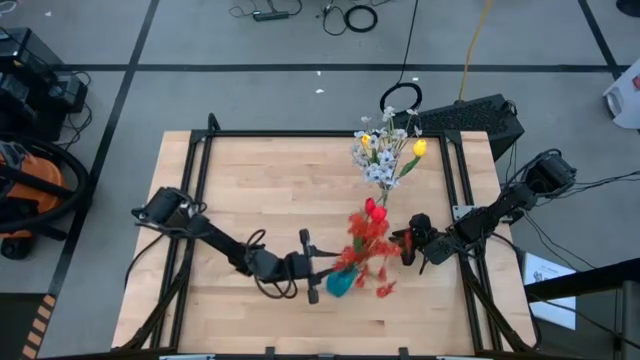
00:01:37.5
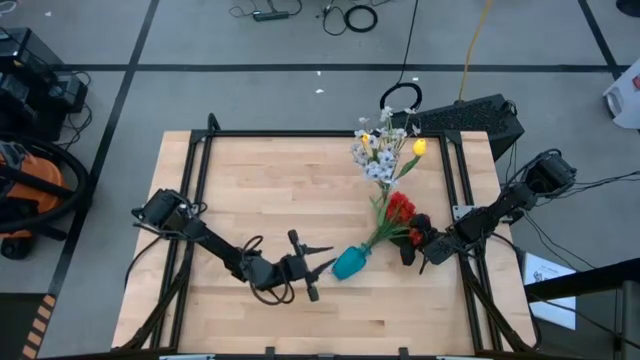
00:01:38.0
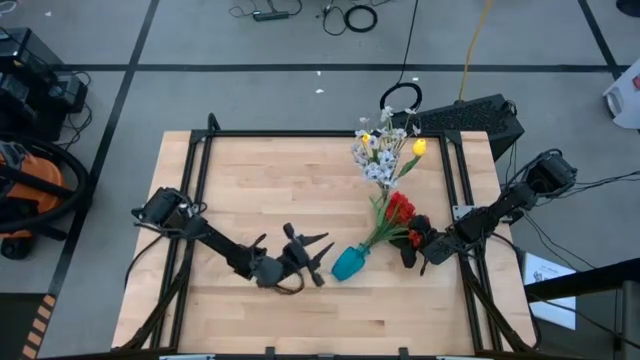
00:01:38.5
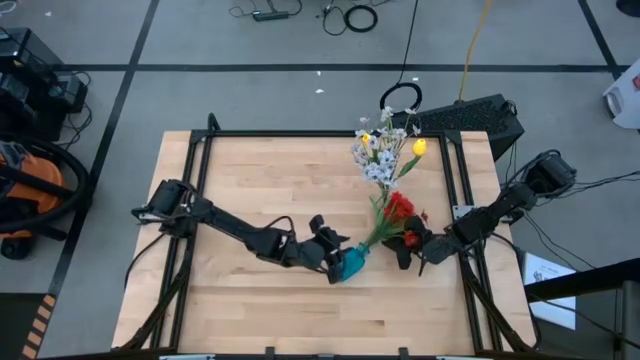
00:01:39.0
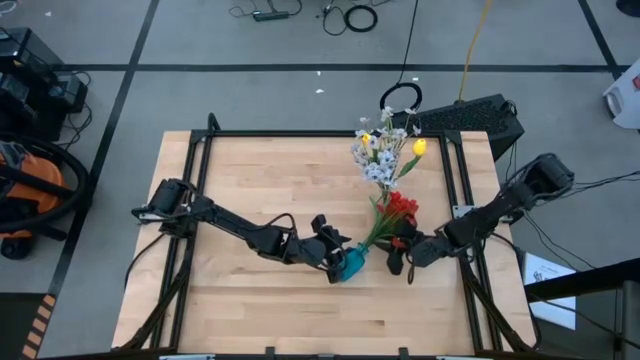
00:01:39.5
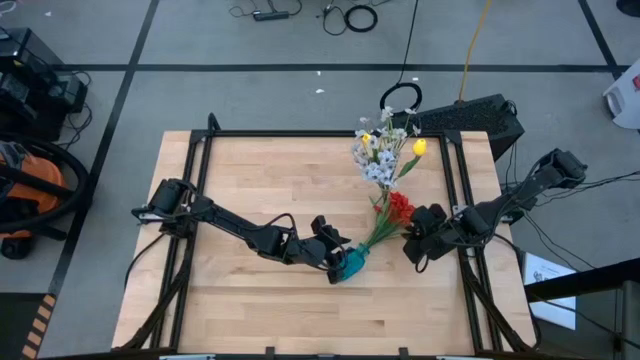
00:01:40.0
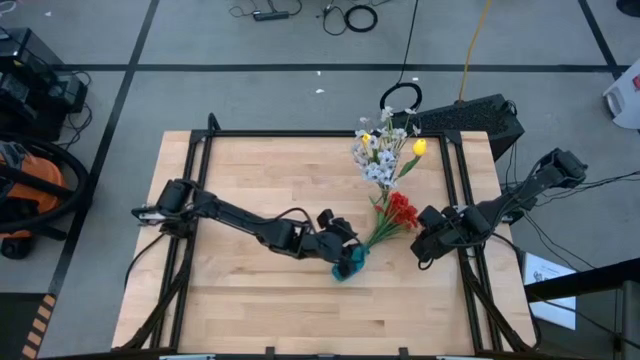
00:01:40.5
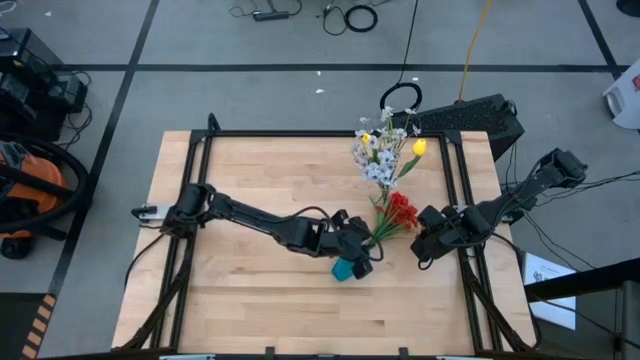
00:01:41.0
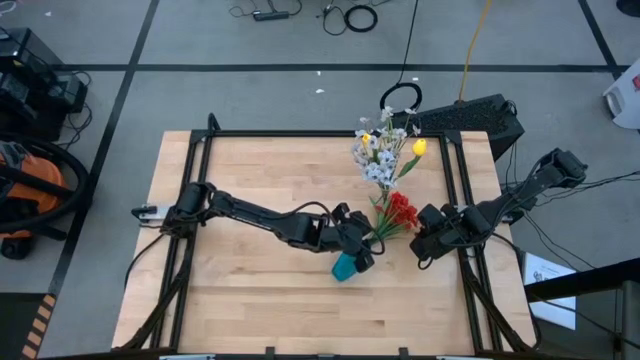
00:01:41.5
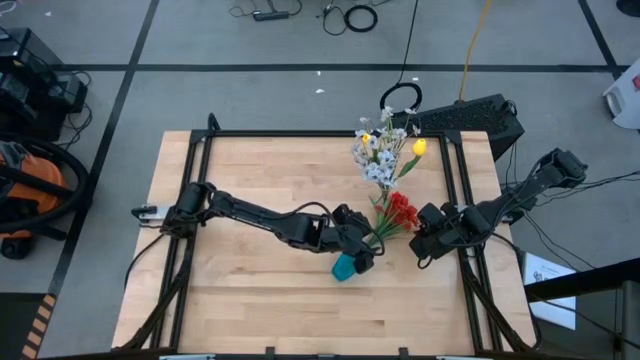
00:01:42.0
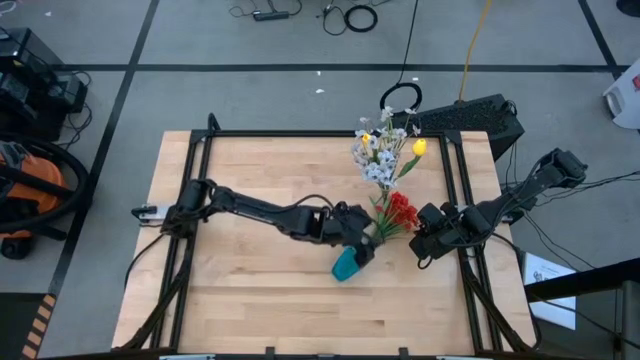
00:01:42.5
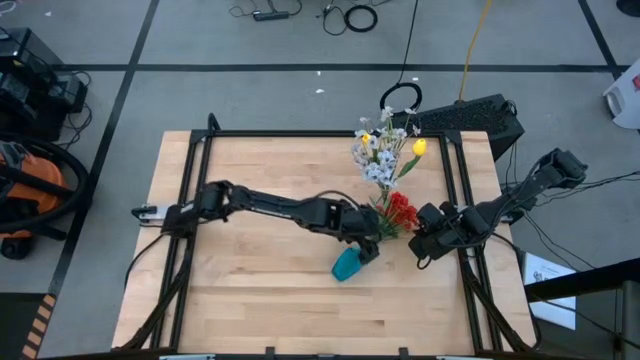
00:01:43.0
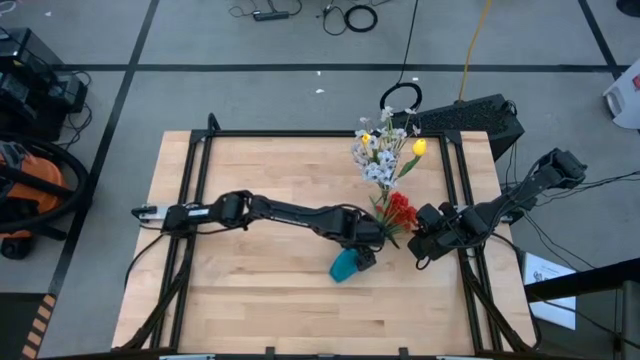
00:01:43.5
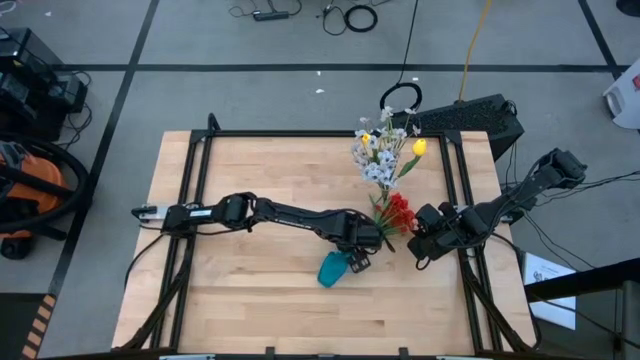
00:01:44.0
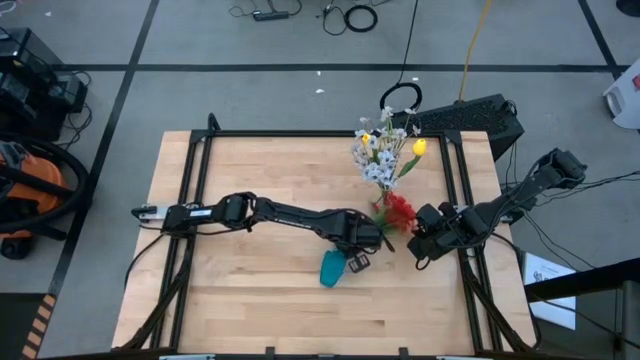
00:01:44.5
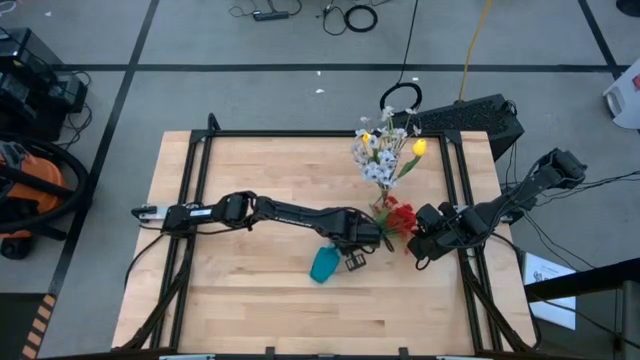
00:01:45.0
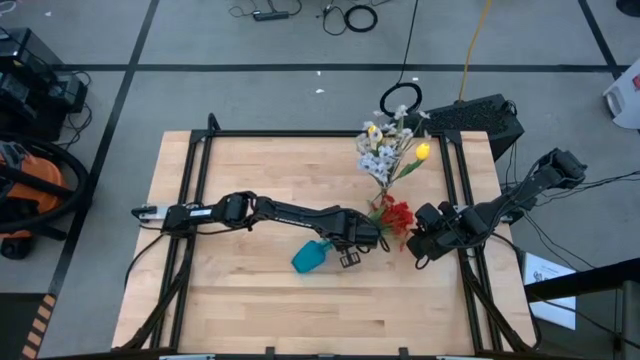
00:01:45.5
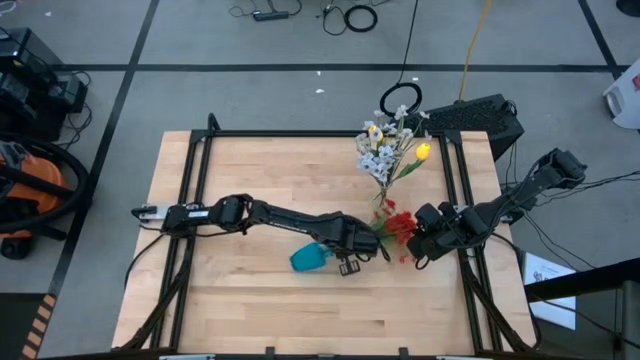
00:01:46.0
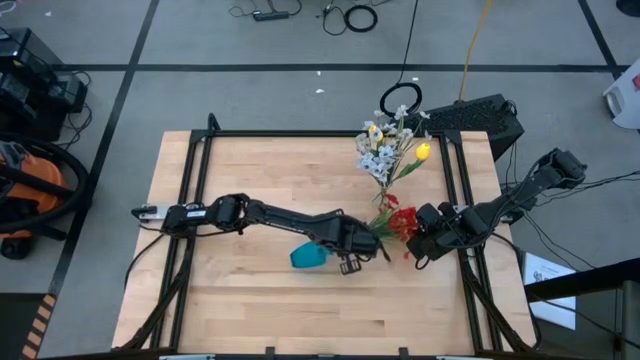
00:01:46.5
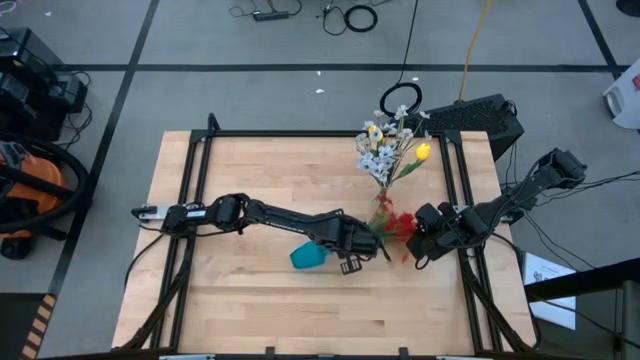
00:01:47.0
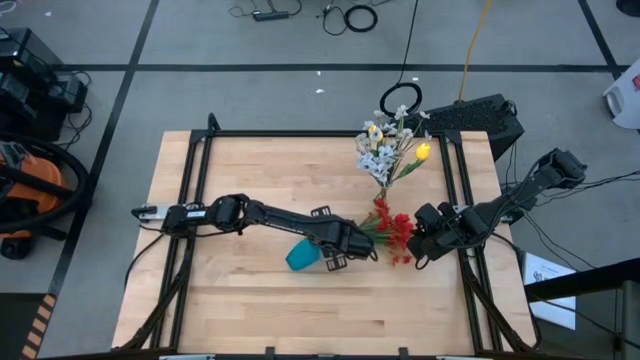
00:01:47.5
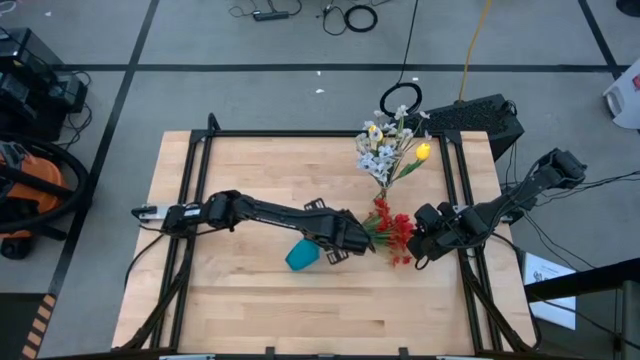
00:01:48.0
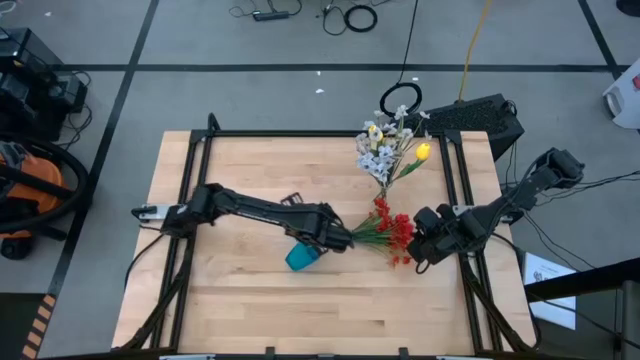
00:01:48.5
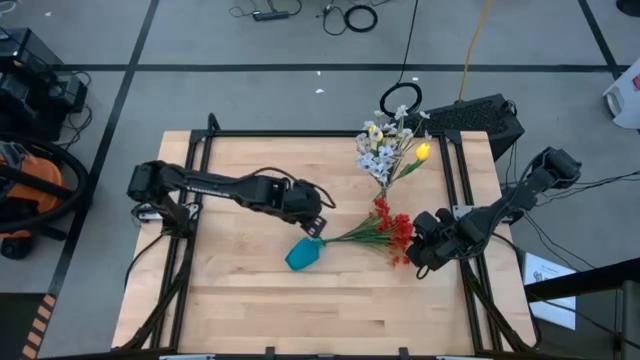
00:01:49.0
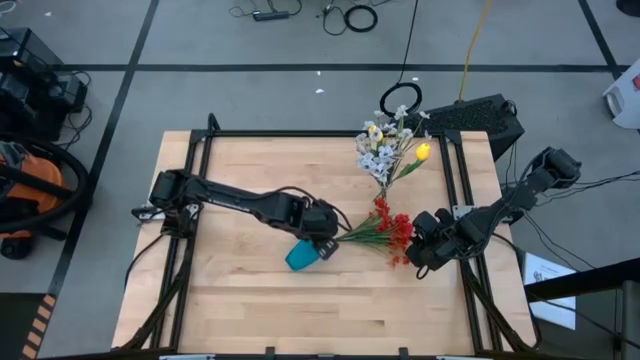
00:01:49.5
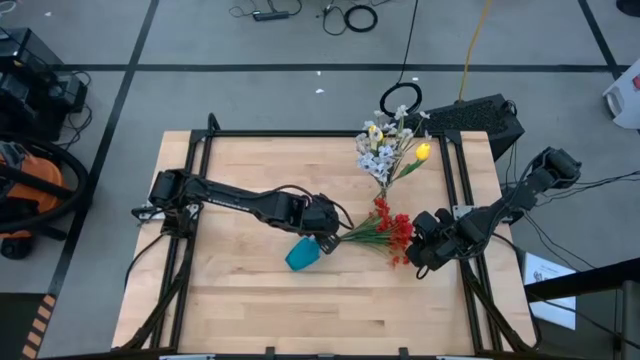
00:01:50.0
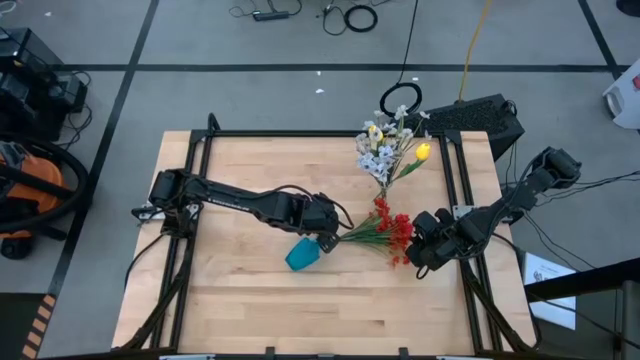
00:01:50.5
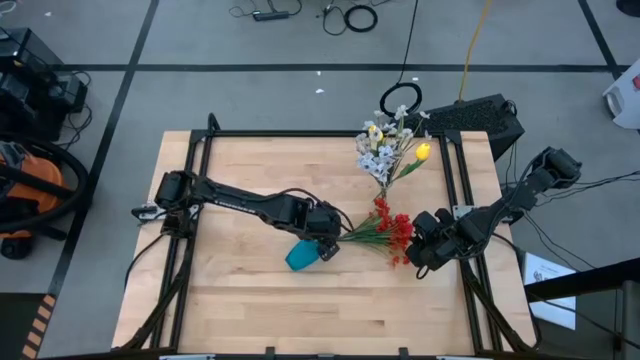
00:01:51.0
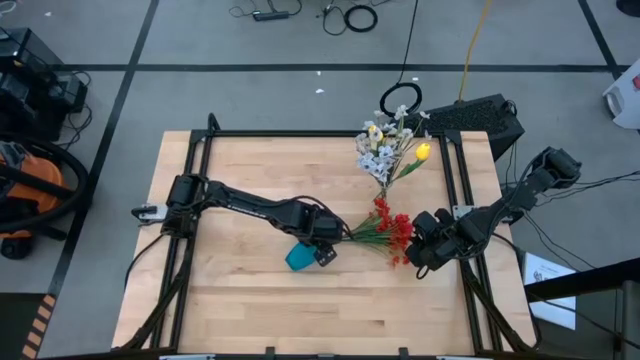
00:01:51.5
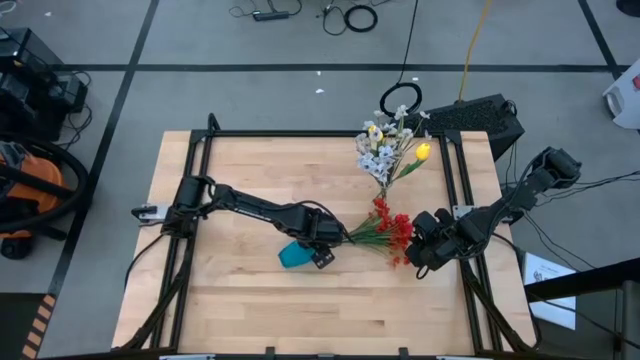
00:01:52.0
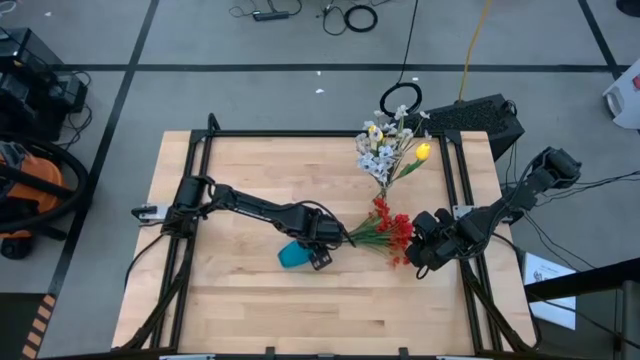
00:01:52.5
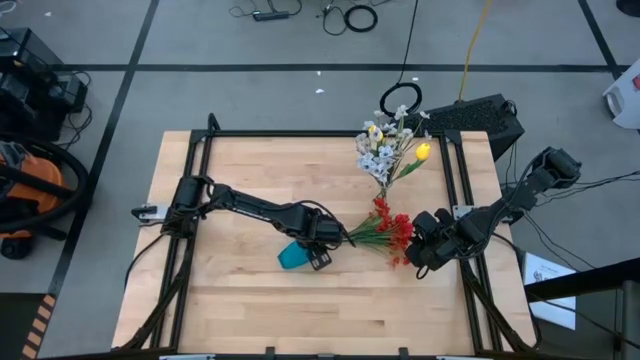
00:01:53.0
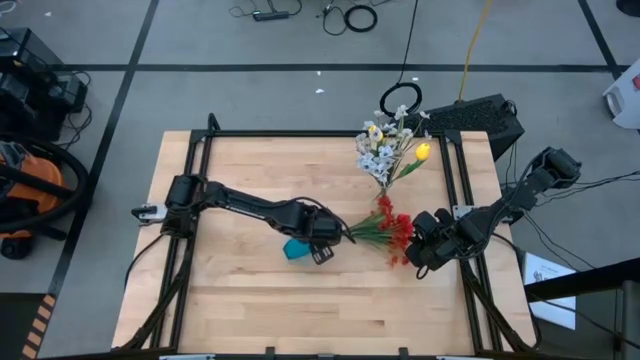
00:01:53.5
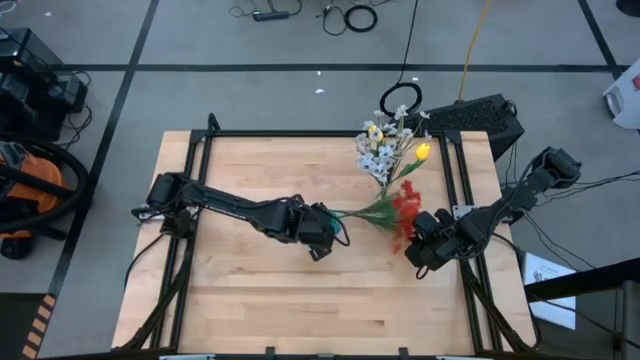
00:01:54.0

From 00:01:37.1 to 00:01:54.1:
Task: Sort flowers into vase by color
Adjust the blue vase on the table

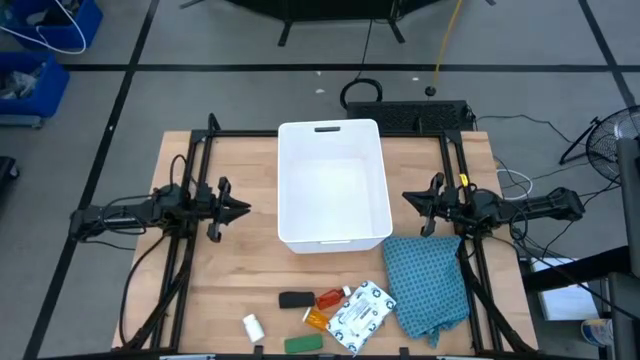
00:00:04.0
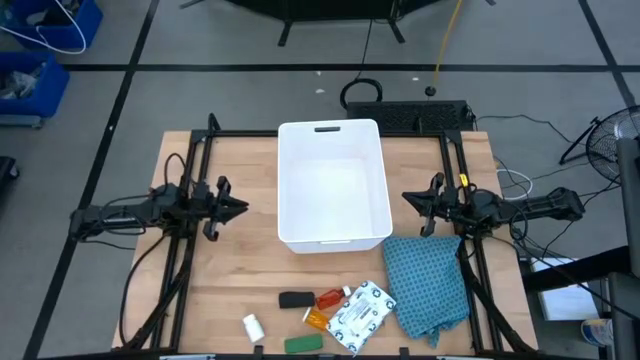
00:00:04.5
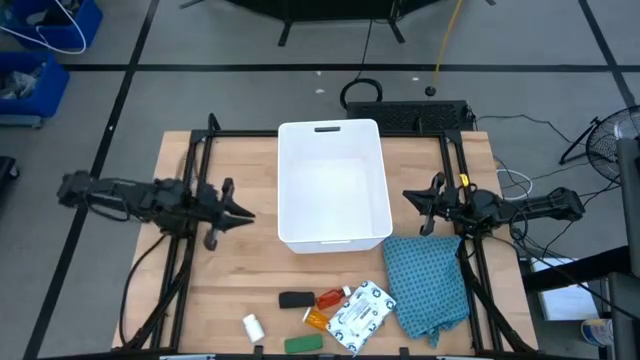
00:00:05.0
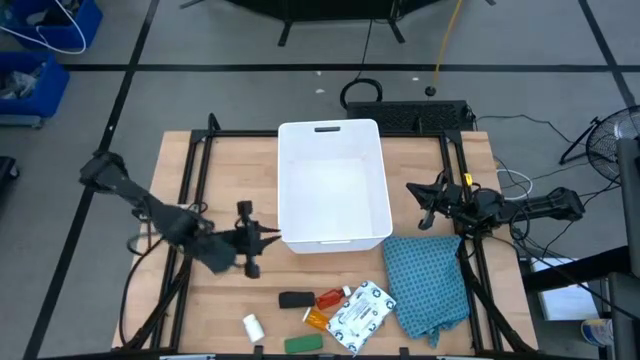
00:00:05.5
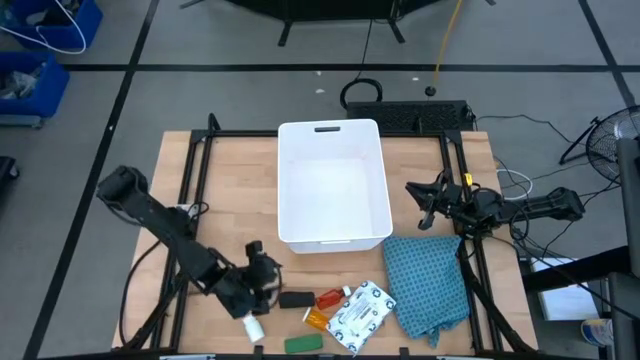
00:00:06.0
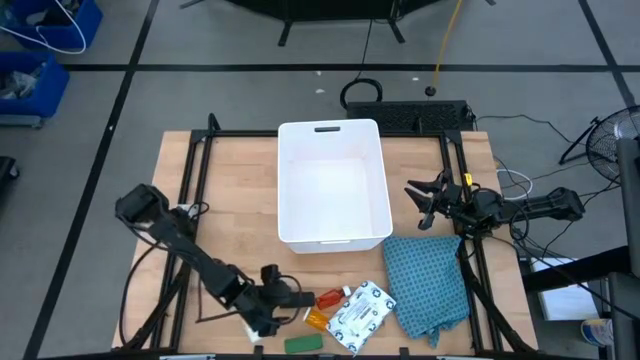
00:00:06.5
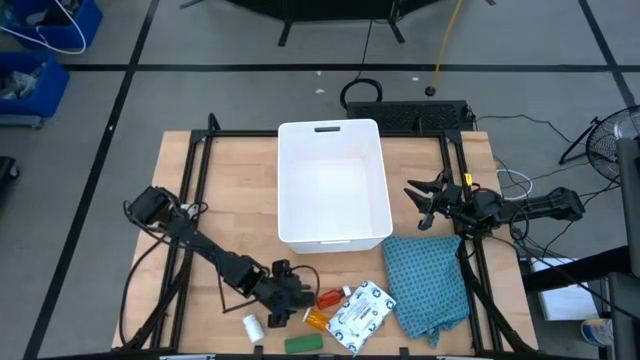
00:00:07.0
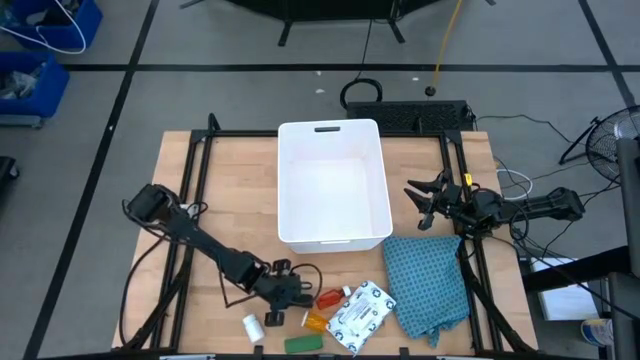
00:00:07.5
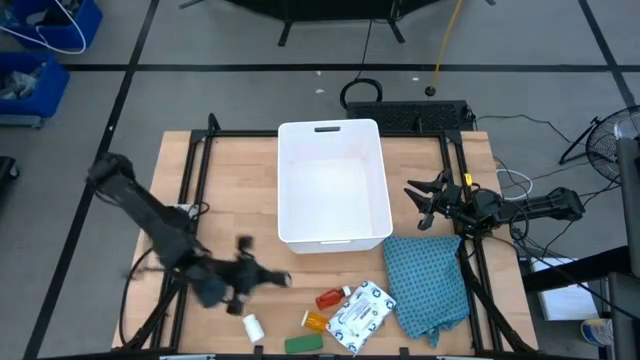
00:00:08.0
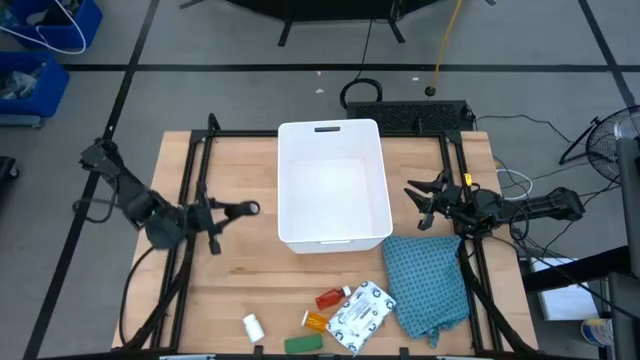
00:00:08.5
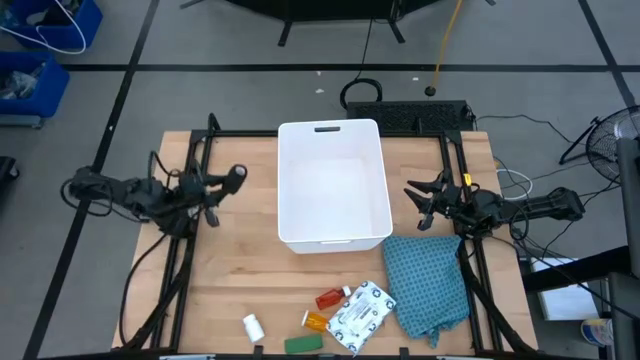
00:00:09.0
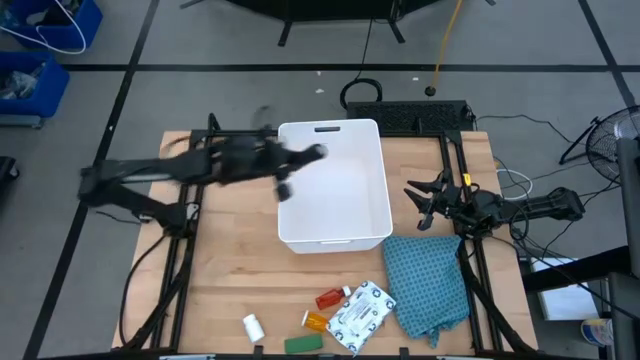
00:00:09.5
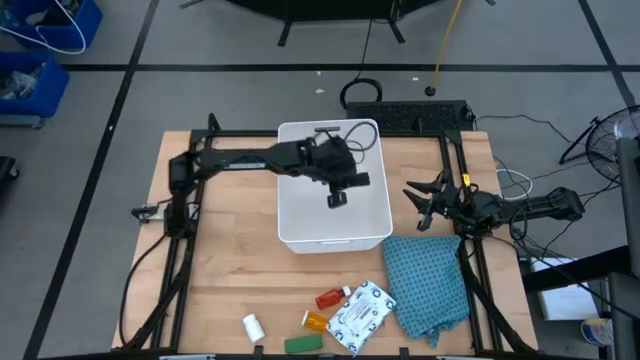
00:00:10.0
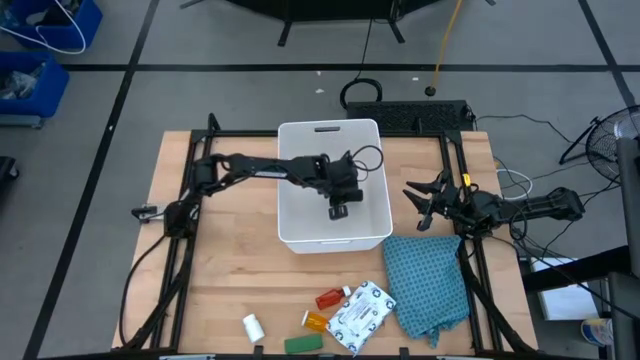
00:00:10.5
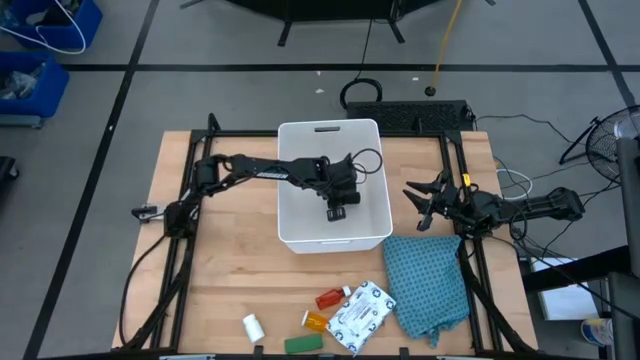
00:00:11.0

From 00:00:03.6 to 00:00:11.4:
Task: Pick & place medical supplies in basket/bin
Put the black bandage into the white bin
